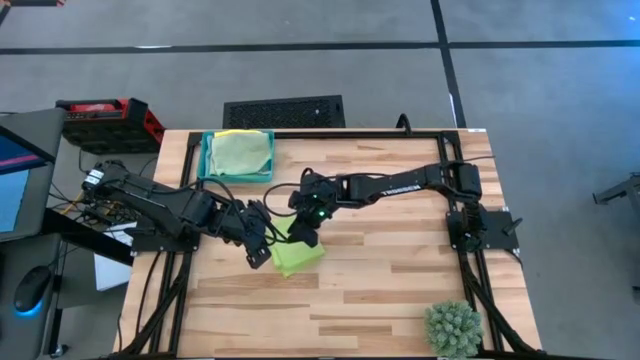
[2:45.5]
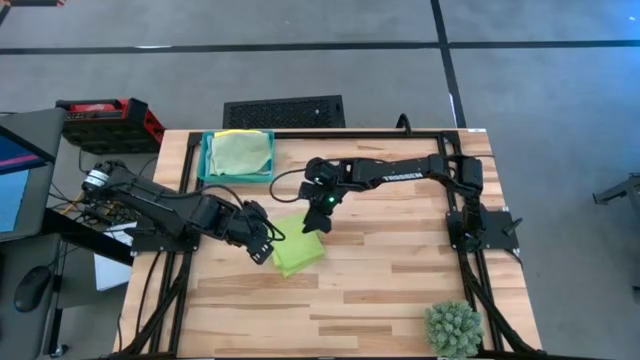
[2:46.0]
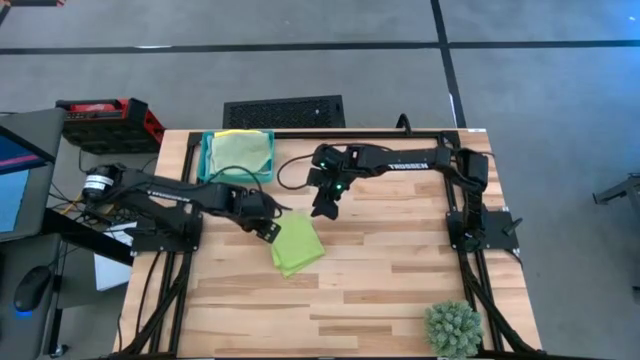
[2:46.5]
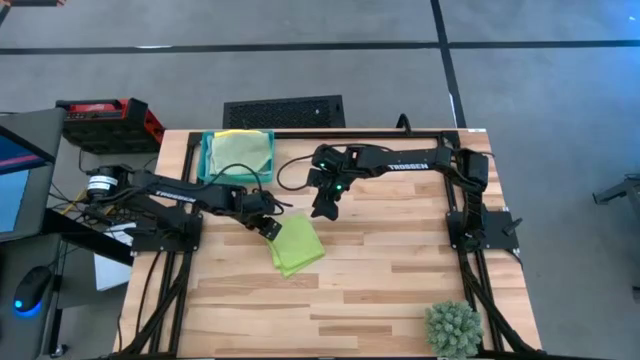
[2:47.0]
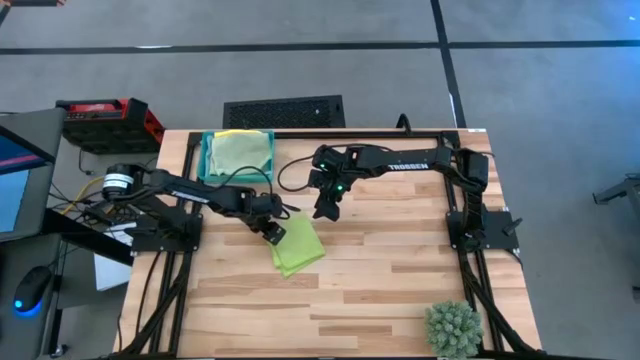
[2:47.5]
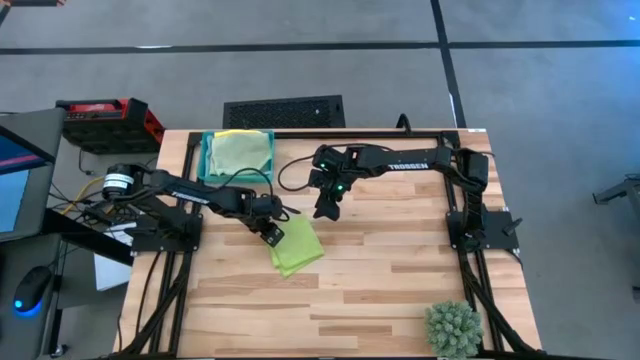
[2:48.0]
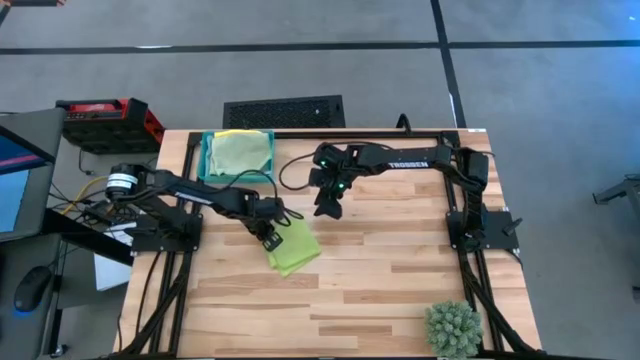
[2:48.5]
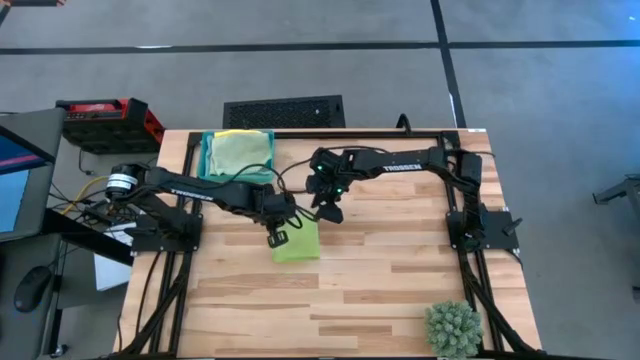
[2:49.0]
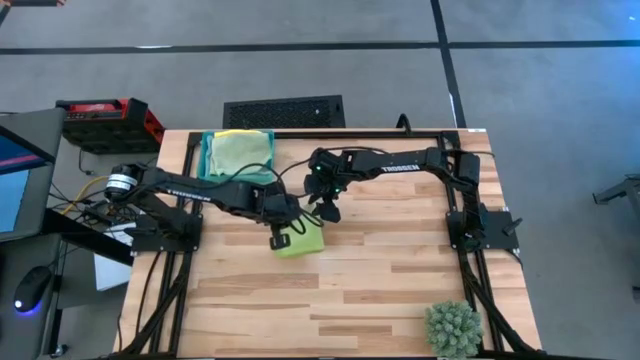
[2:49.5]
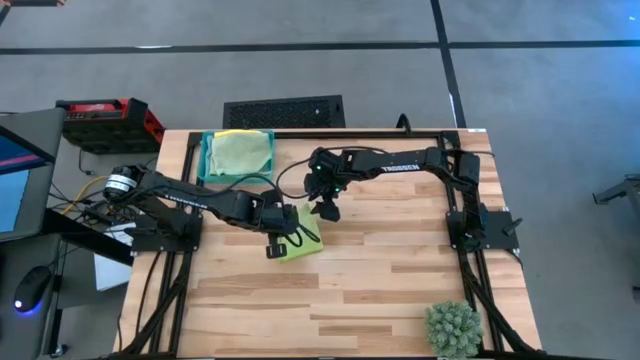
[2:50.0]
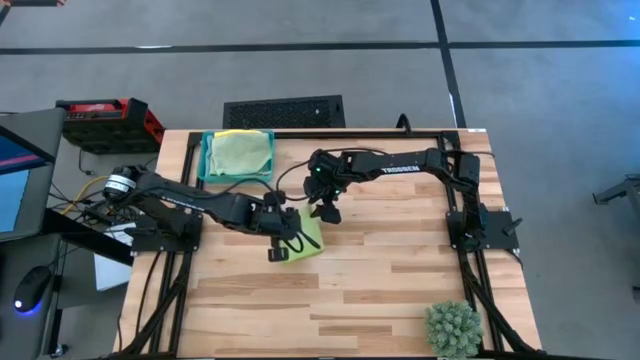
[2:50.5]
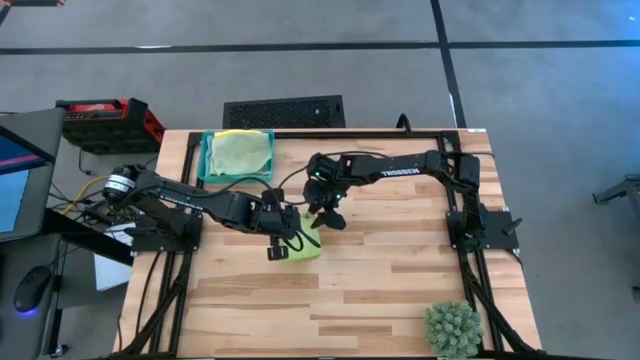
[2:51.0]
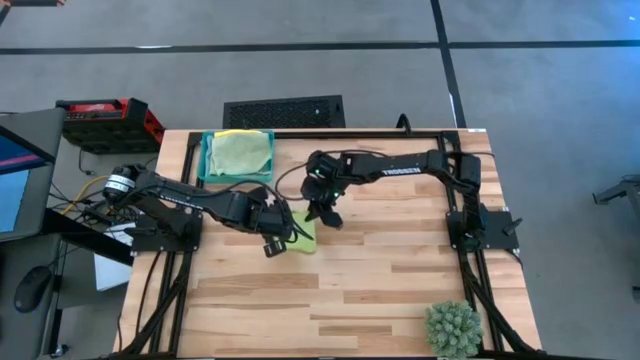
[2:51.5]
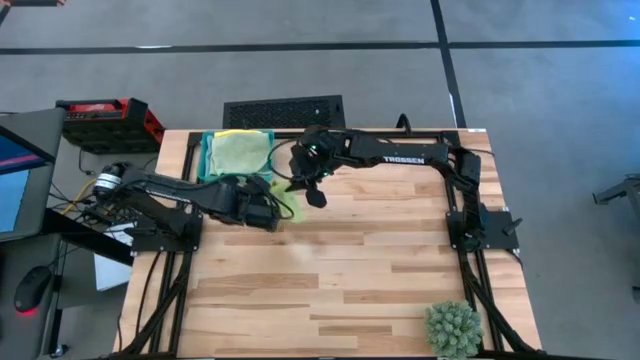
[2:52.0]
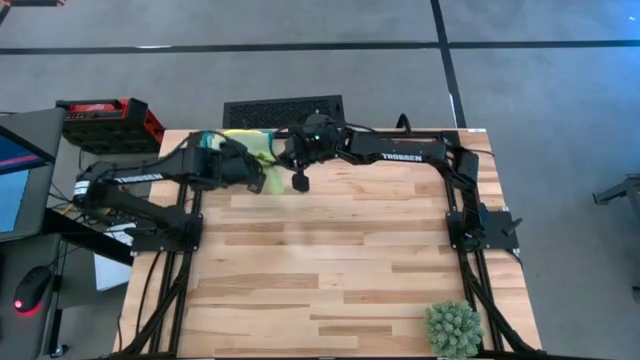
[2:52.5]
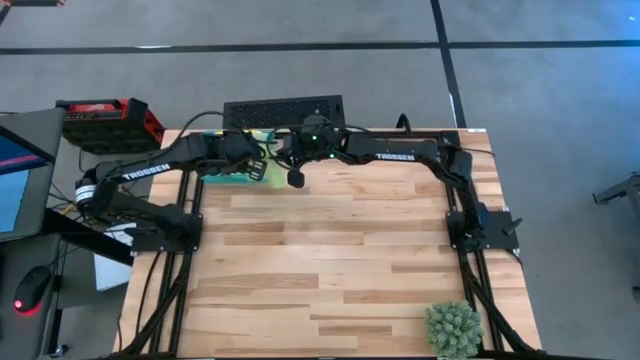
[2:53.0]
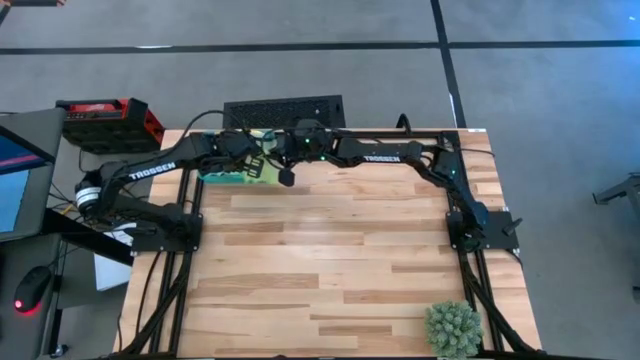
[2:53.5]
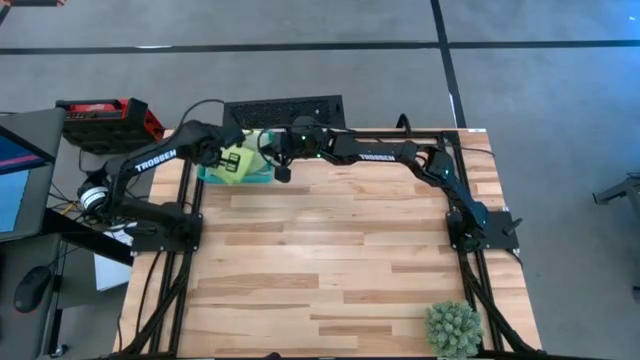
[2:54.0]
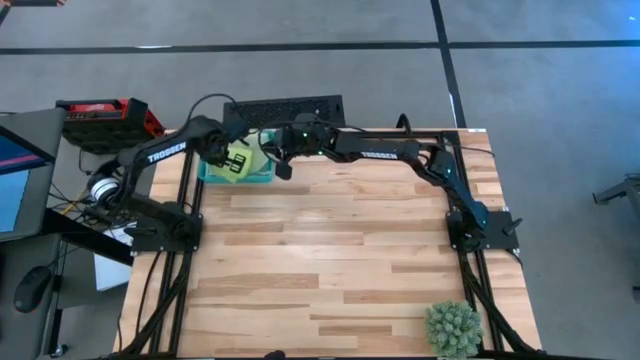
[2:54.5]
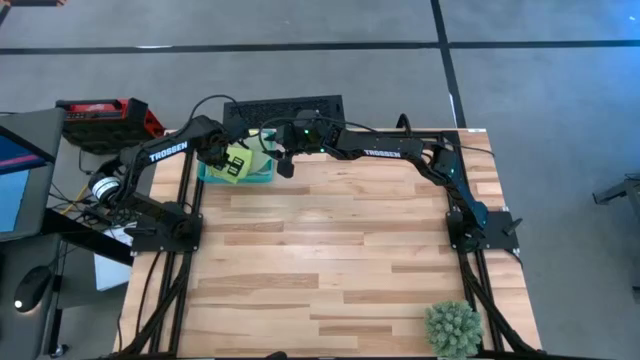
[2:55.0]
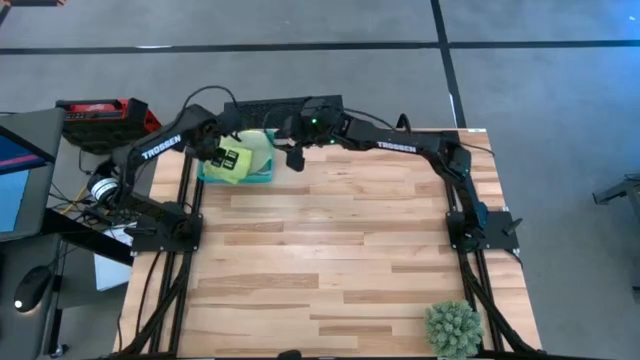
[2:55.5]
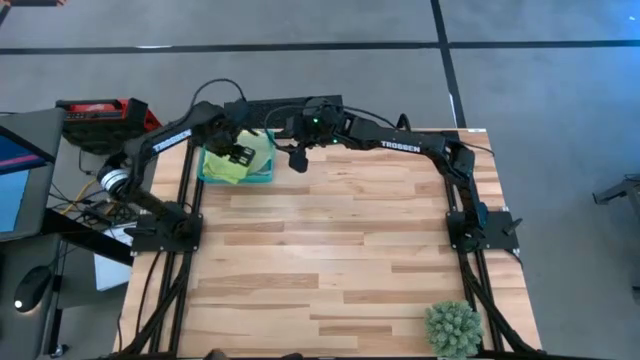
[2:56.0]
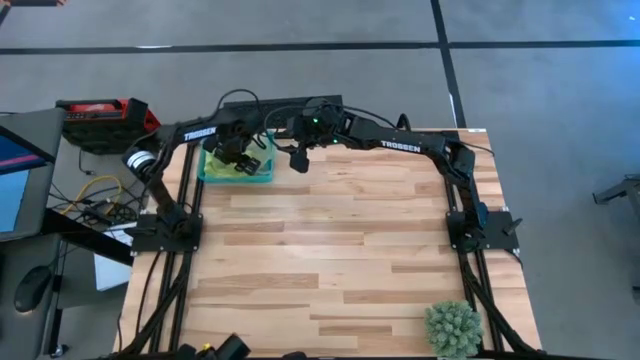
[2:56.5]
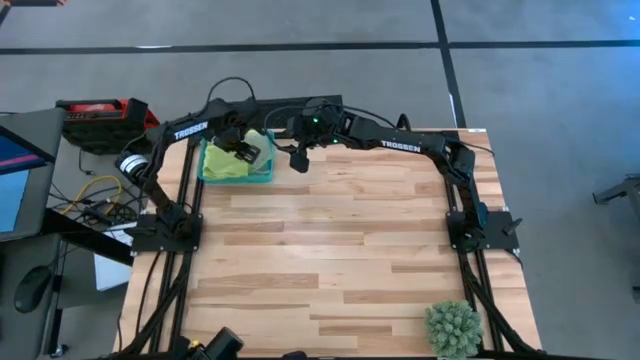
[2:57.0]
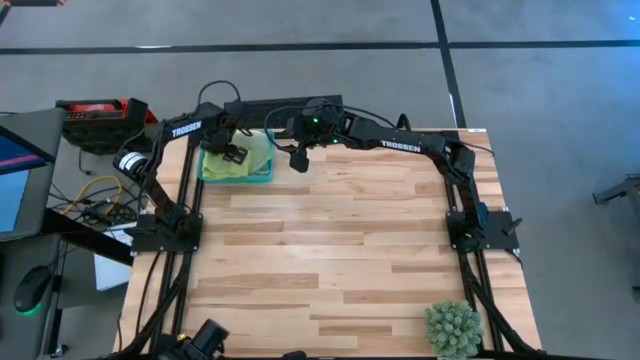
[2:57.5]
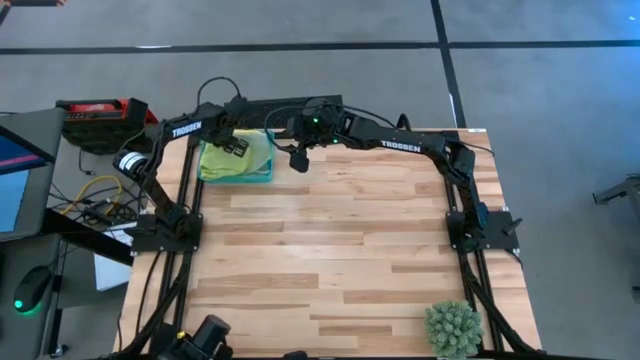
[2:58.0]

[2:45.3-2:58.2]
Task: Fold microfiber towels
Stack the folded light green microfiber on top of the green microfiber towel

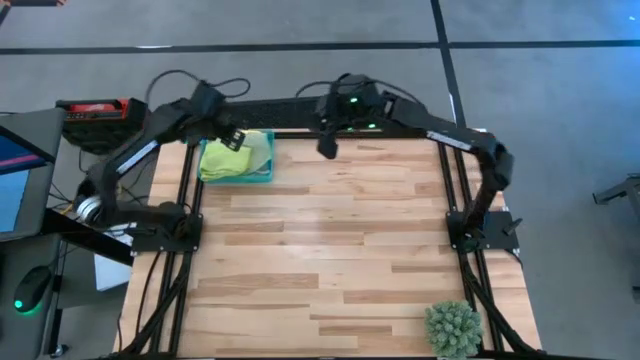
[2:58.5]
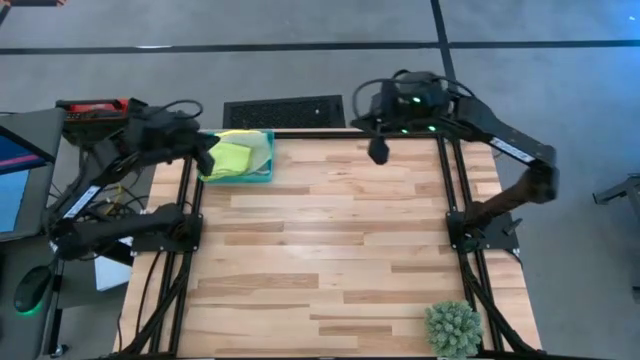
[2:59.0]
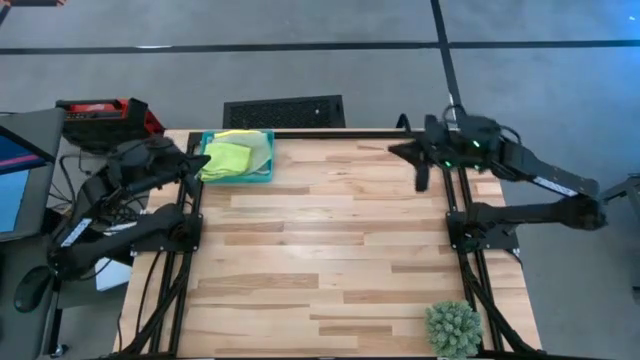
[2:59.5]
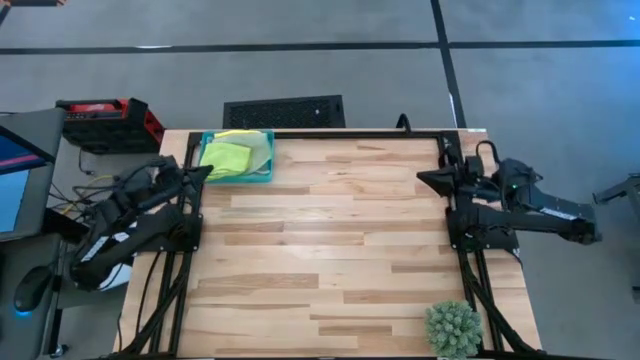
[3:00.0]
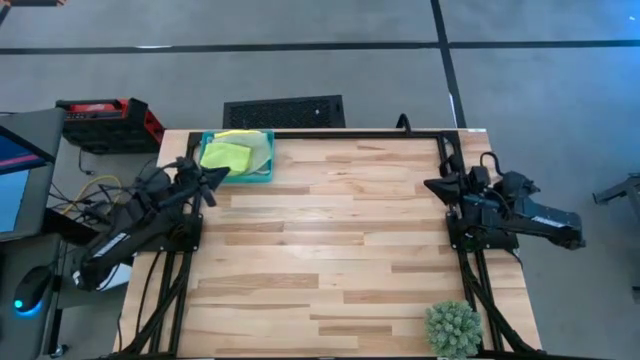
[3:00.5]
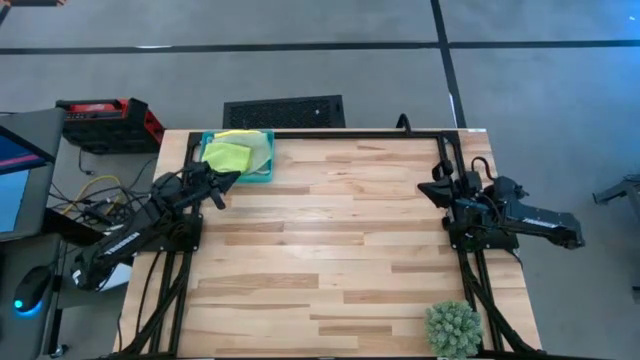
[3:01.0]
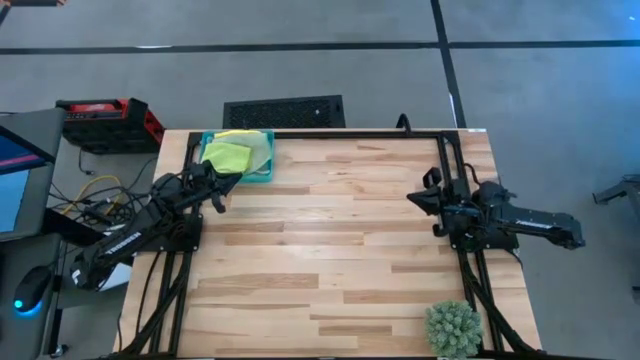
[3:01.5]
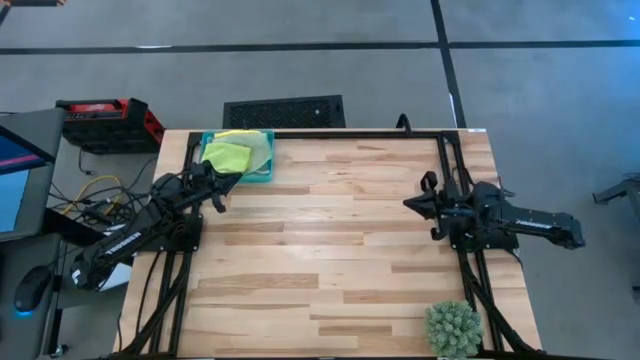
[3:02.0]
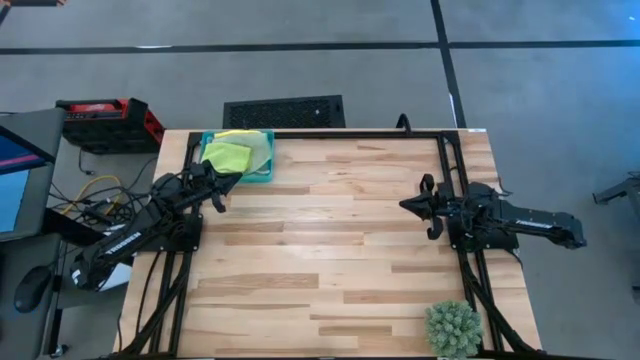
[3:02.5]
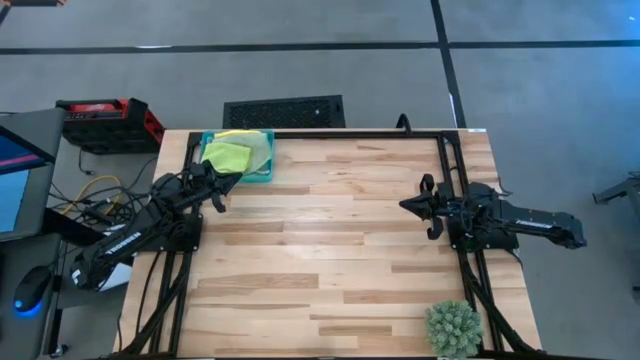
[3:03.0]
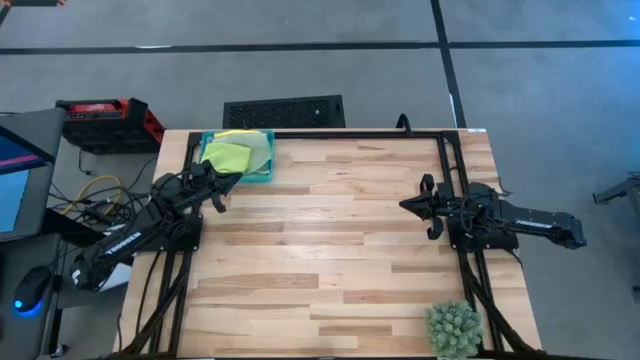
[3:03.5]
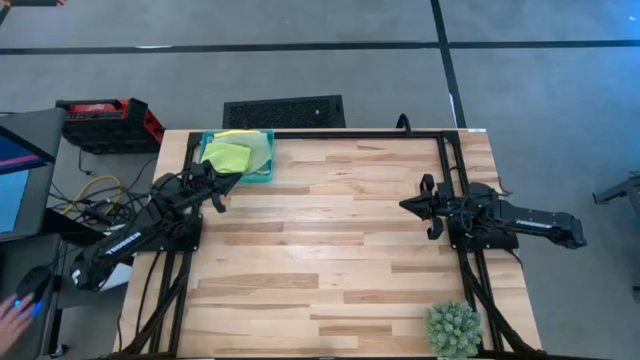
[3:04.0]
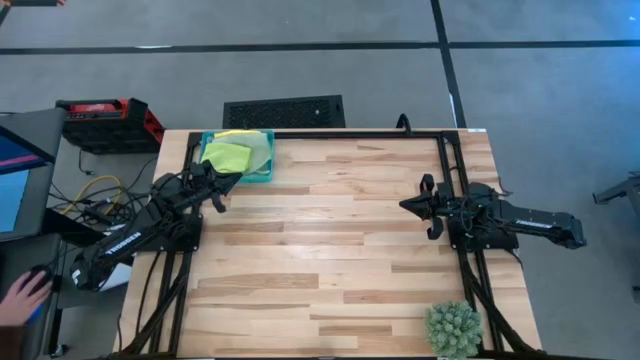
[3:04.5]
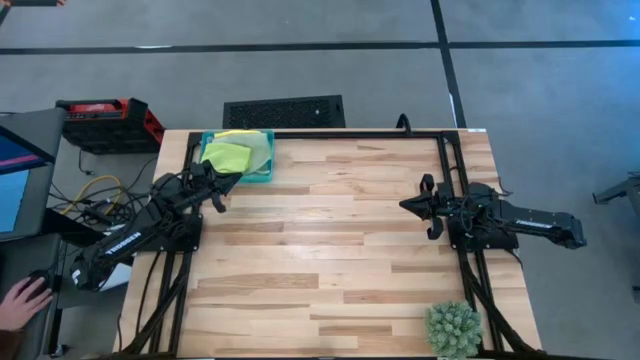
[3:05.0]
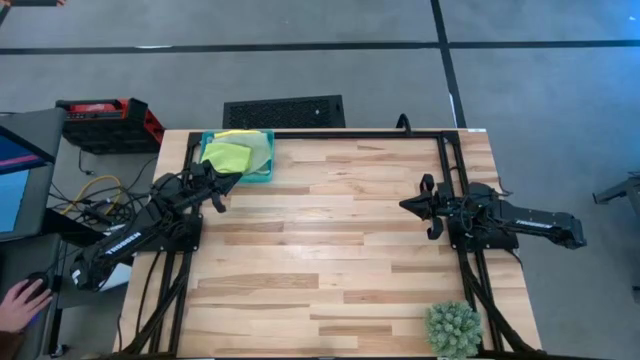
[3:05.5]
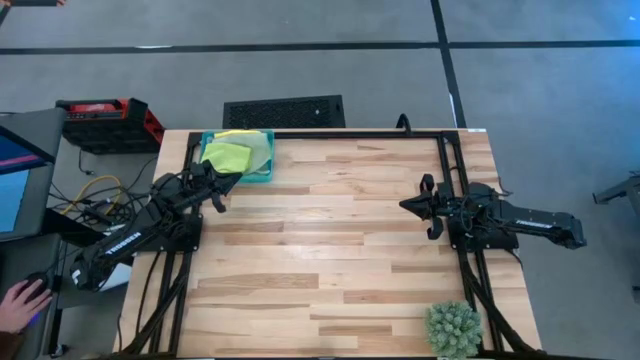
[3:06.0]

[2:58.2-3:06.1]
Return to Home Position
